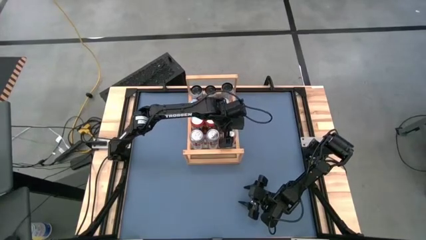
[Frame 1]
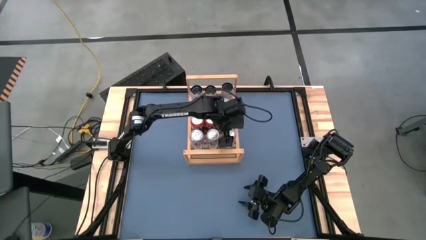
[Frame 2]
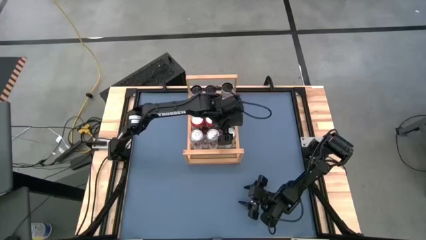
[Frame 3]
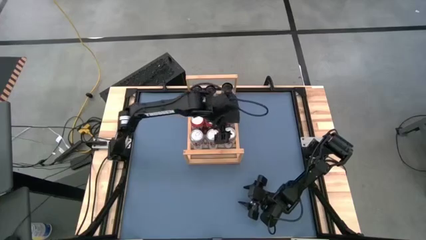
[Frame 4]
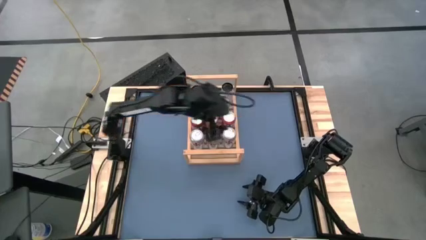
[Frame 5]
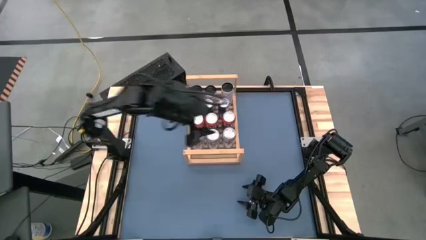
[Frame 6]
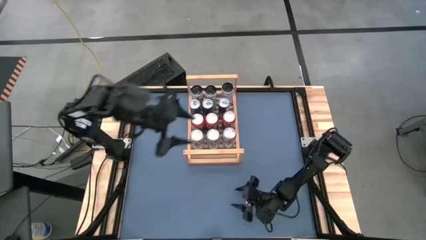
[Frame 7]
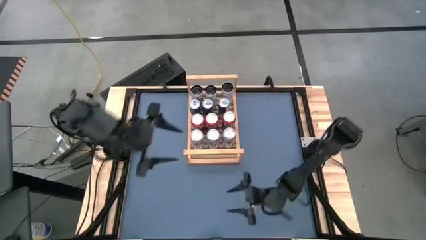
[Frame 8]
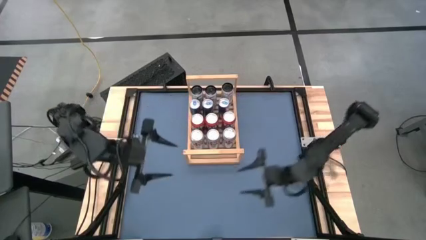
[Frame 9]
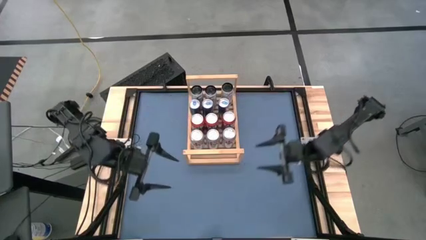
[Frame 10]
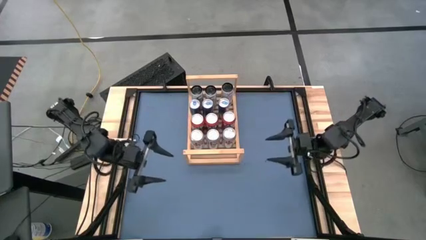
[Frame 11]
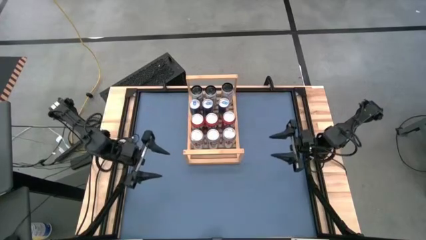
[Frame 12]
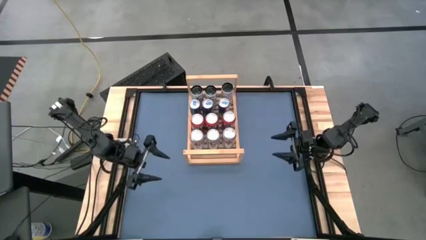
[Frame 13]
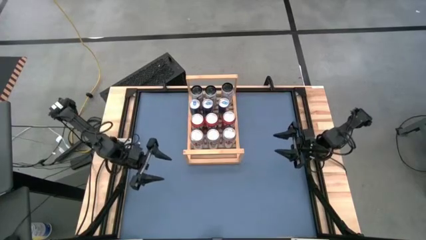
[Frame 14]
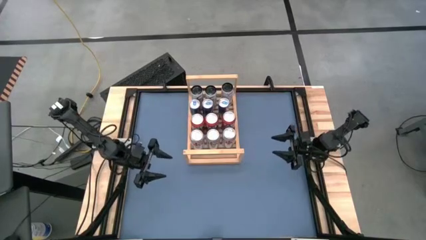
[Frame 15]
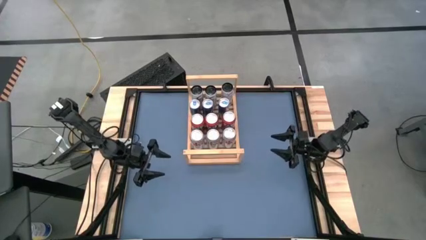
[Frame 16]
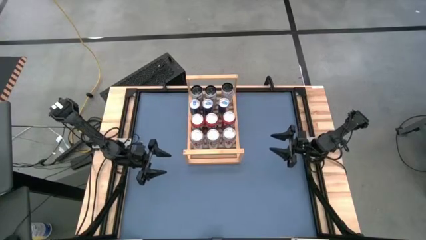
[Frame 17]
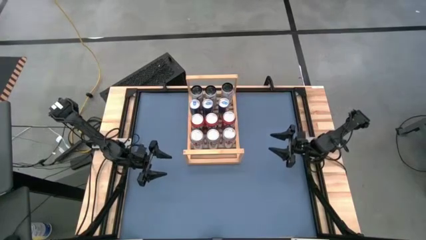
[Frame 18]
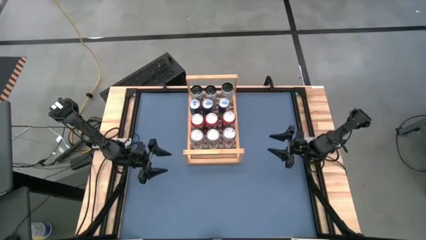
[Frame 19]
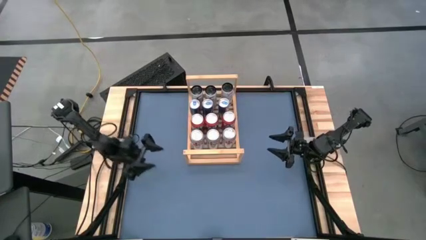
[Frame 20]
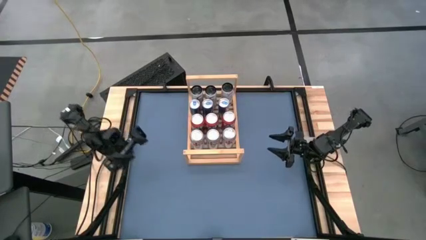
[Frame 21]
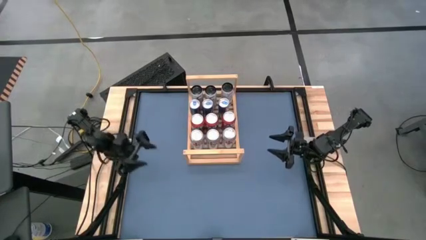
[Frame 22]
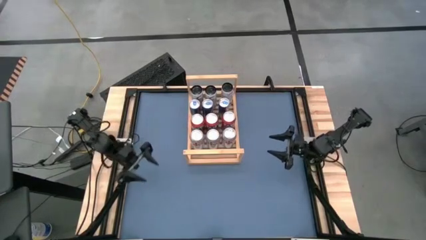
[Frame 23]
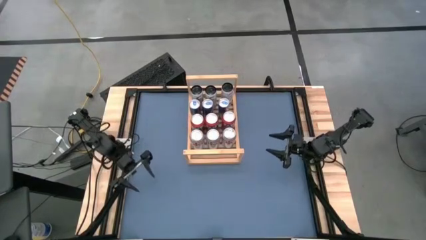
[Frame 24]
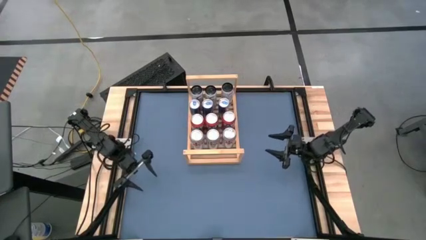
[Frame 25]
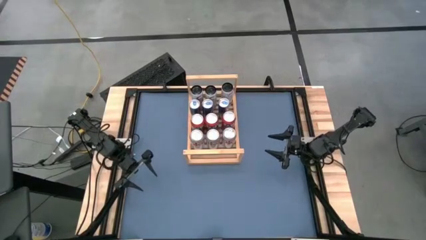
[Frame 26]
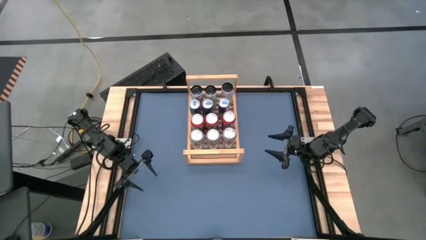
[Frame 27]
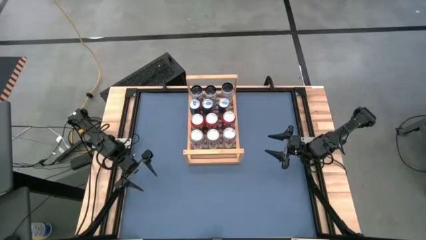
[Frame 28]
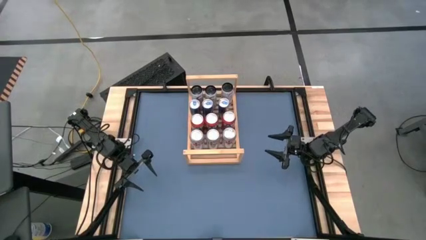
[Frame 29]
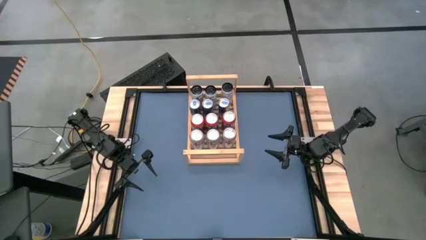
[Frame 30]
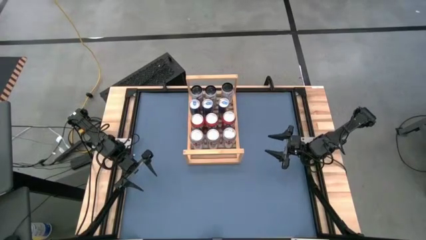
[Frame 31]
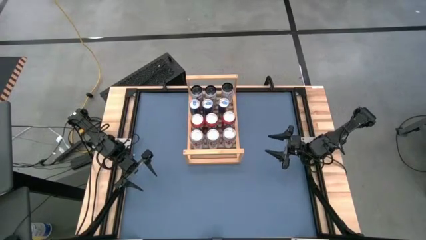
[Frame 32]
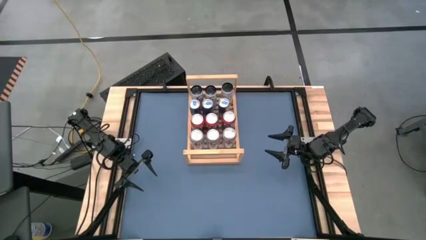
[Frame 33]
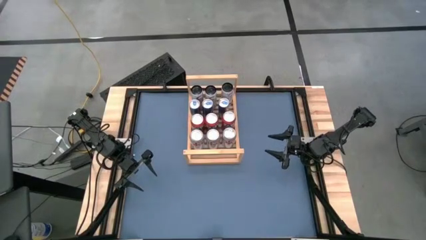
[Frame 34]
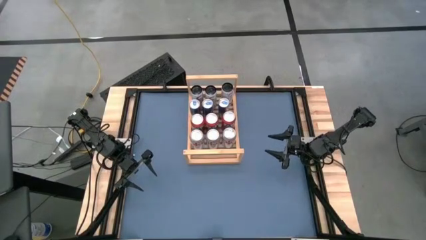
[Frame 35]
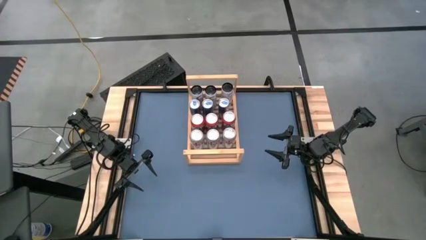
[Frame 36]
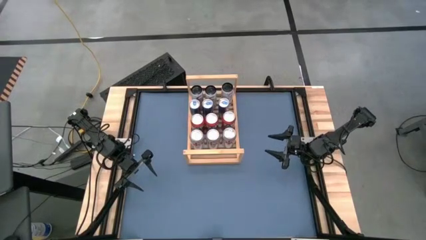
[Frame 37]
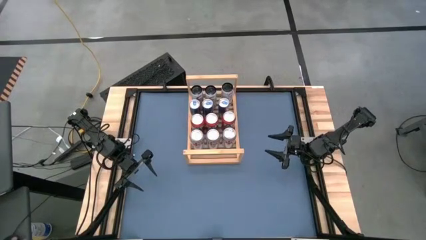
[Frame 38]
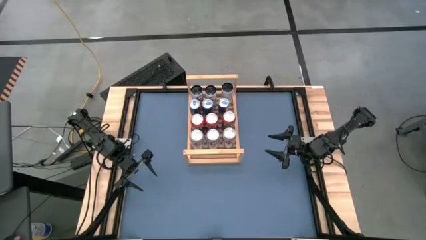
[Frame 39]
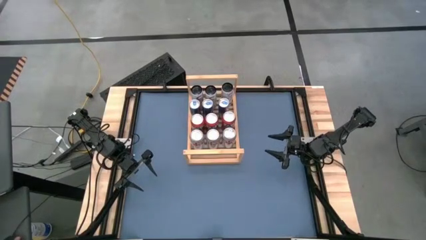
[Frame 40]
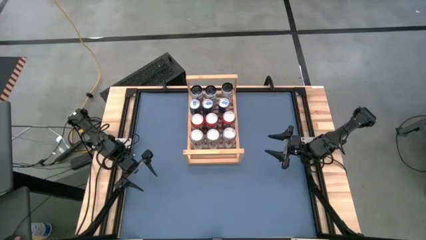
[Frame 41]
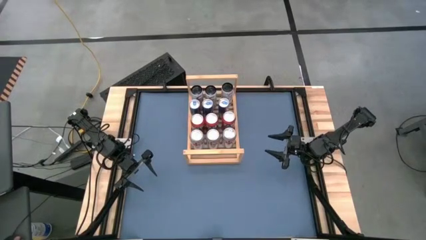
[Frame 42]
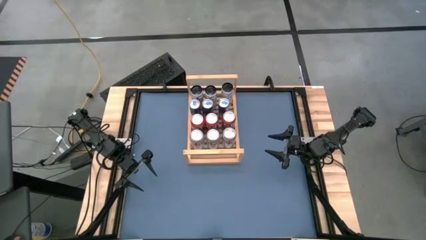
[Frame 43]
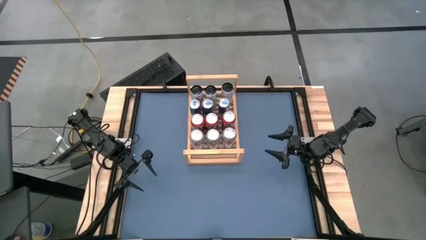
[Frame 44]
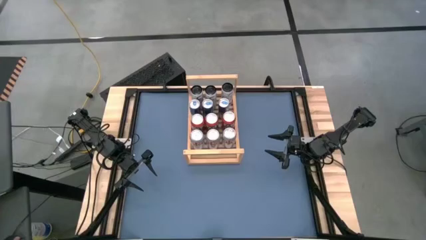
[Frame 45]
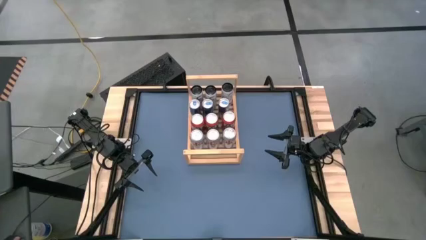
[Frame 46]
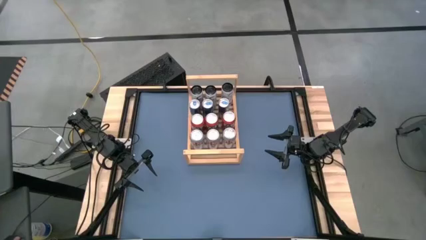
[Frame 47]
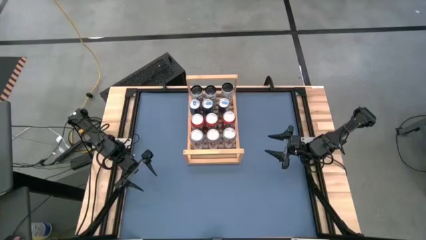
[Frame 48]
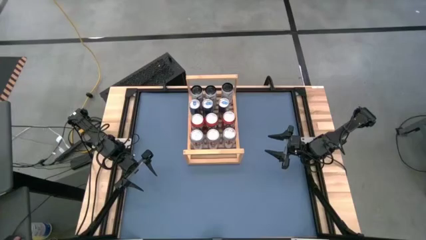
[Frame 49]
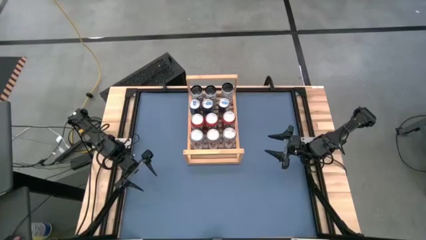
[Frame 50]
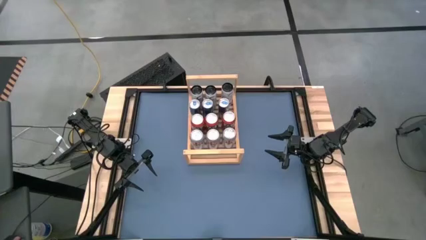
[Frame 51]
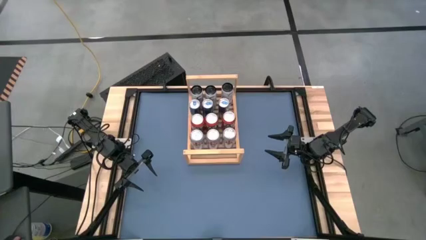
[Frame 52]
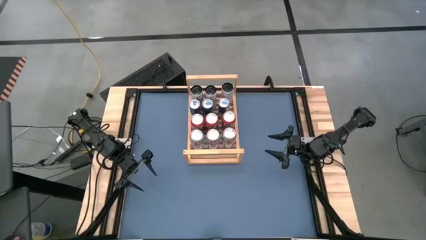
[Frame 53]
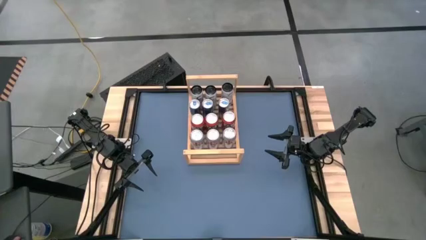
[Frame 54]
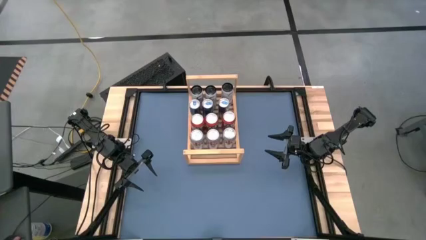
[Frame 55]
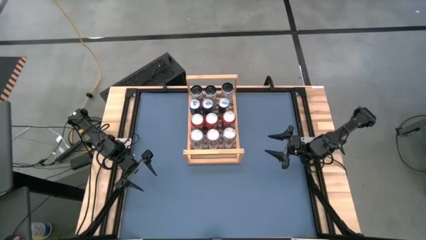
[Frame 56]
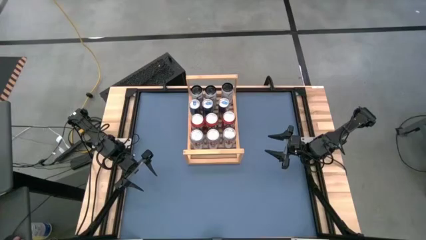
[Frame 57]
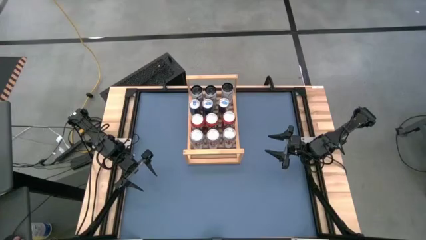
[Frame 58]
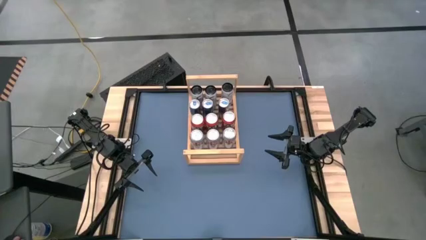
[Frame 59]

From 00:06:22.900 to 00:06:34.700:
Task: Place canned beverage on shelf
Return to Home Position

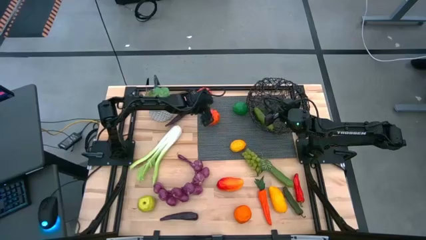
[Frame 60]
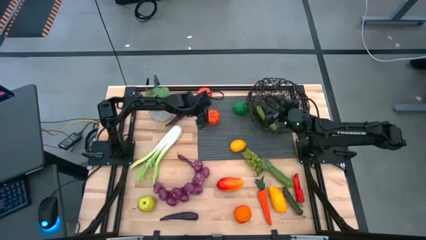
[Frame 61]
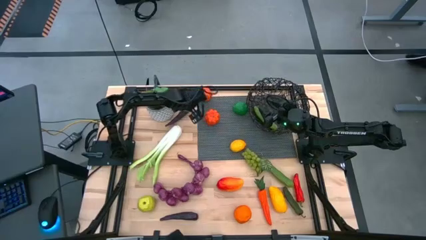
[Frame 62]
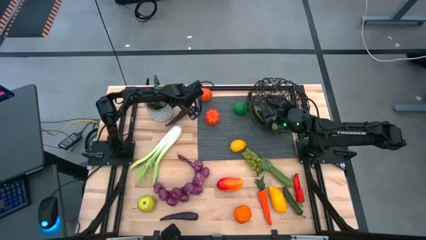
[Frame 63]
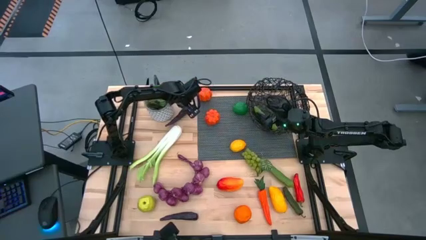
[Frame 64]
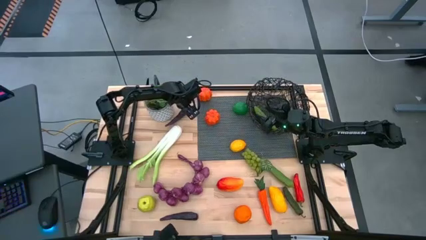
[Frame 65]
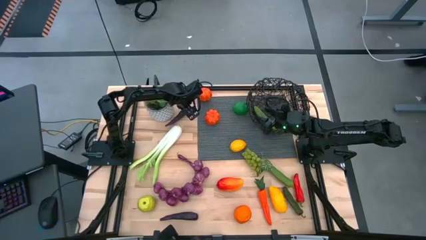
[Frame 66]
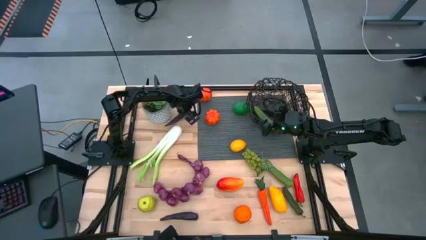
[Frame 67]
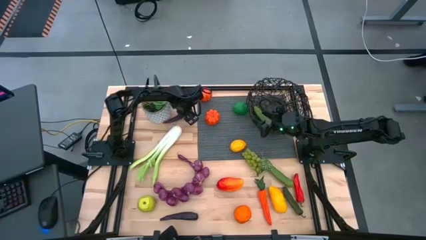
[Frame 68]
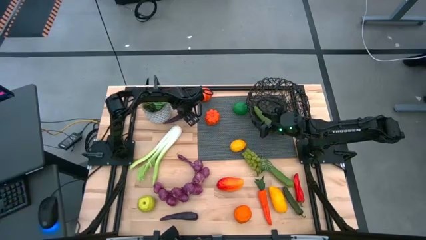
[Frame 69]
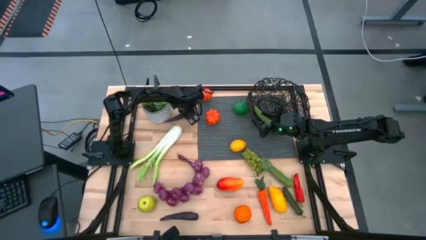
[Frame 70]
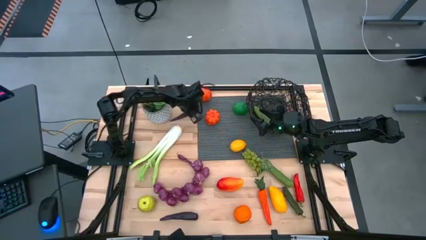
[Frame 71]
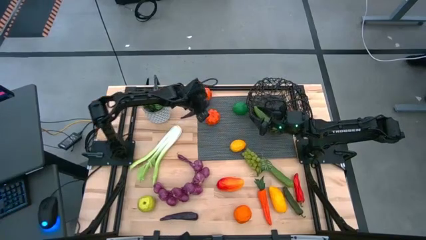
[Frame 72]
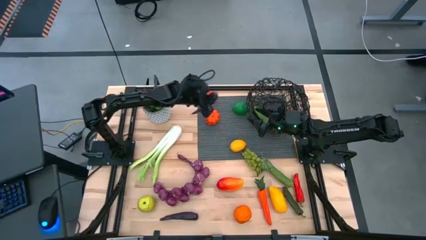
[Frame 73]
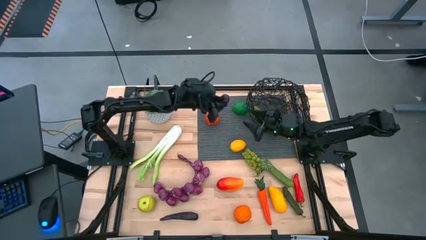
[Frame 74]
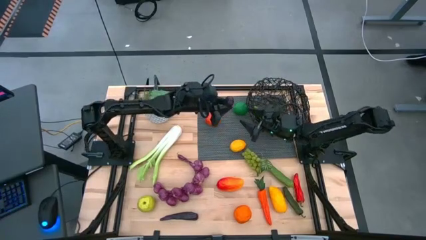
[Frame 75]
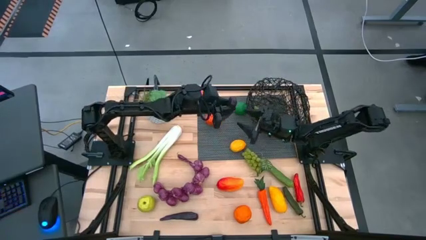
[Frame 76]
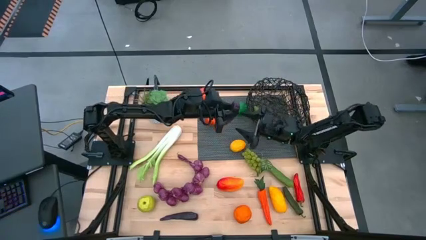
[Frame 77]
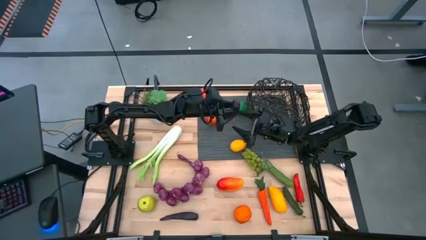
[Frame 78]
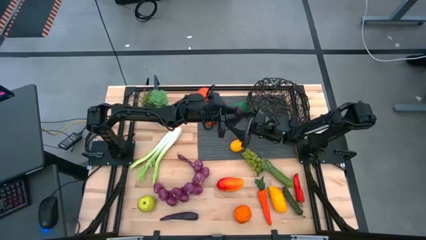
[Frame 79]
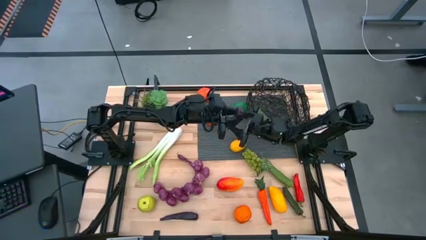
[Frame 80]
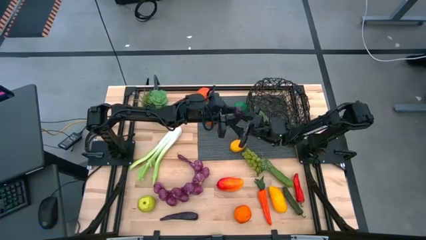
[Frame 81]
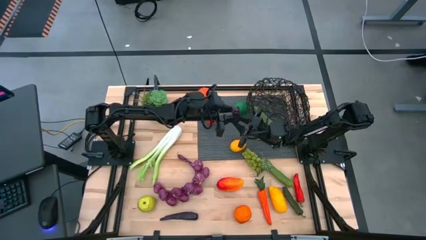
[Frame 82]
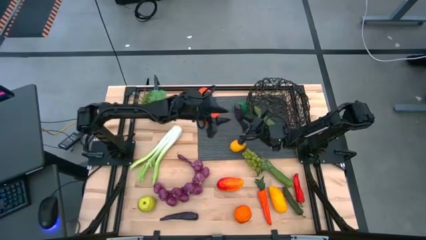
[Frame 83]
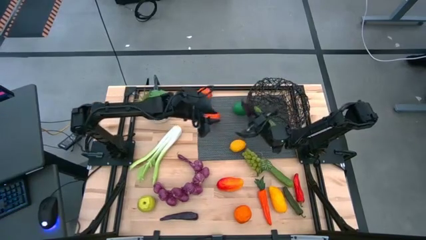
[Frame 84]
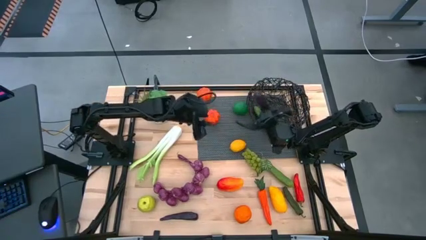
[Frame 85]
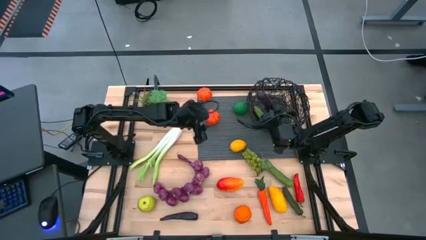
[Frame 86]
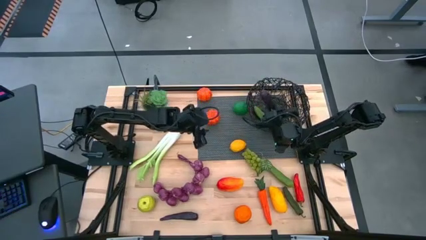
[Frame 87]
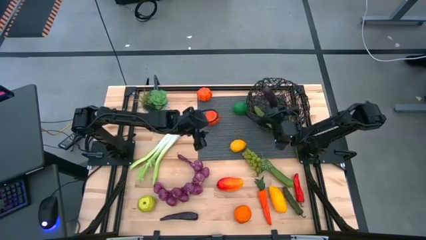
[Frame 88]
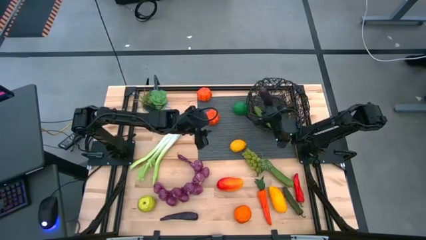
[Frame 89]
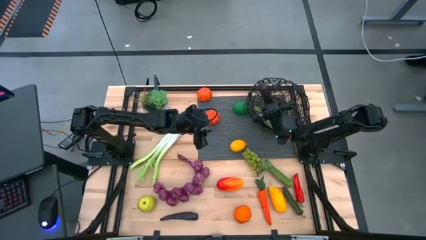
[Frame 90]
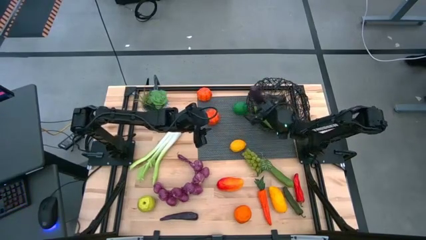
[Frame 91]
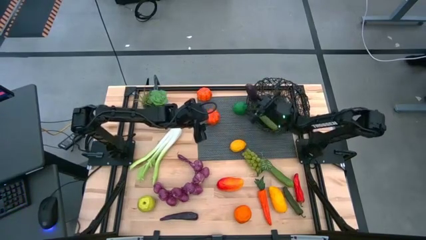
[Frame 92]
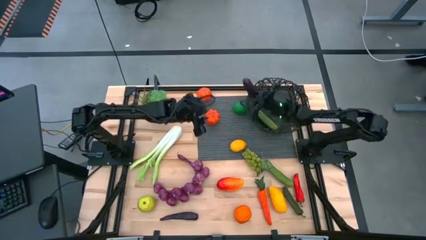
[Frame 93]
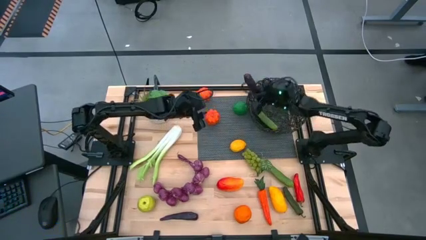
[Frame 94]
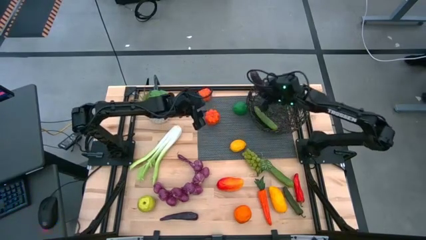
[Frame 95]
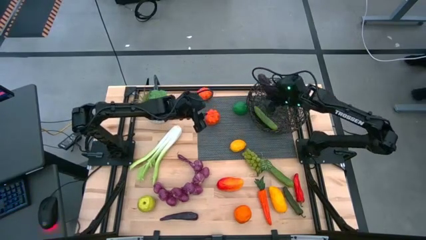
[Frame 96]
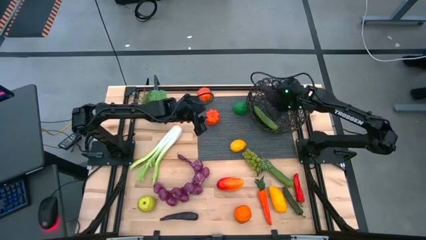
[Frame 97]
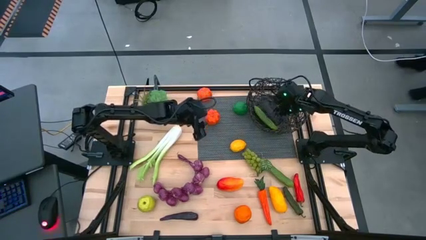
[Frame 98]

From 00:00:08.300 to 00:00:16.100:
Task: Build produce basket
Put the top purple eggplant into the black basket
